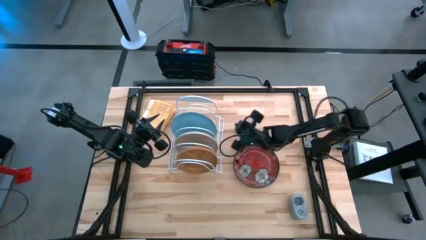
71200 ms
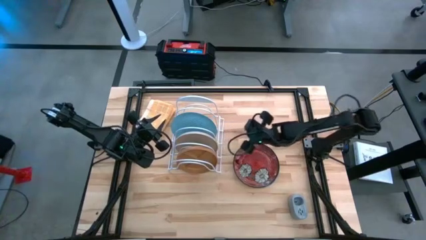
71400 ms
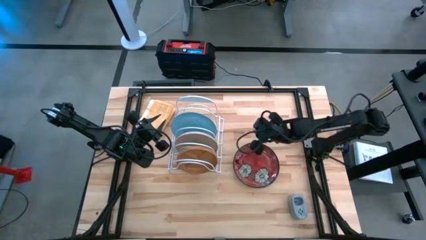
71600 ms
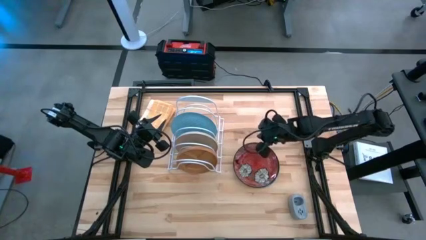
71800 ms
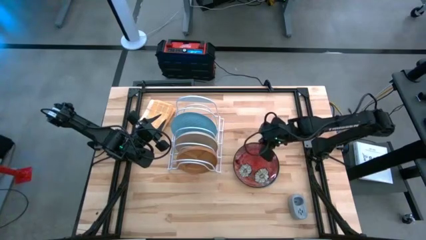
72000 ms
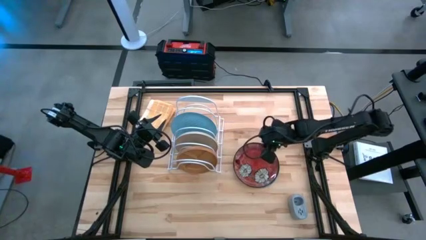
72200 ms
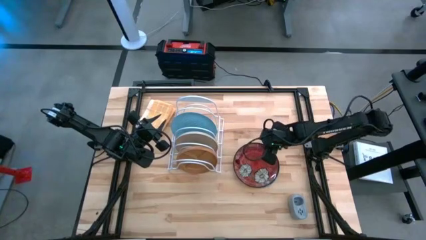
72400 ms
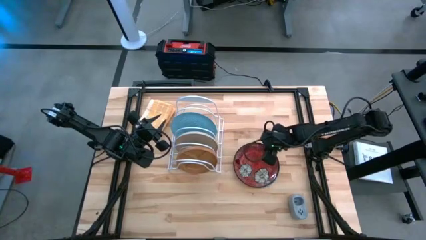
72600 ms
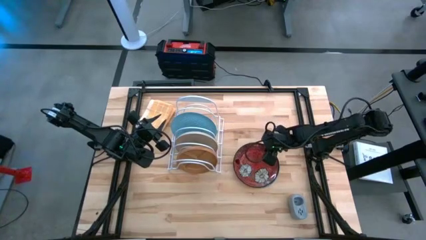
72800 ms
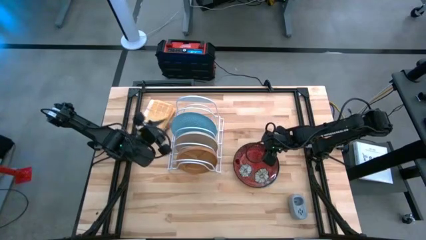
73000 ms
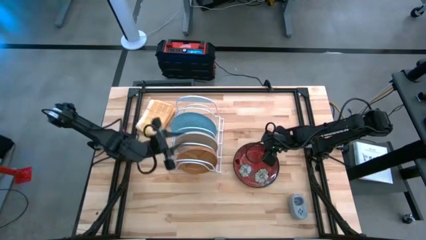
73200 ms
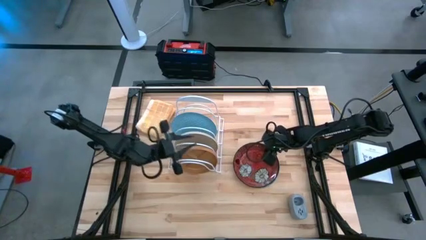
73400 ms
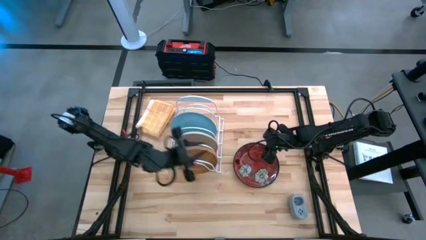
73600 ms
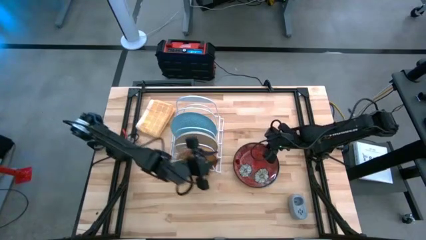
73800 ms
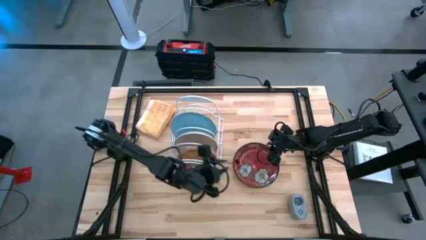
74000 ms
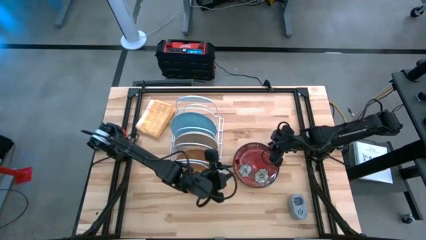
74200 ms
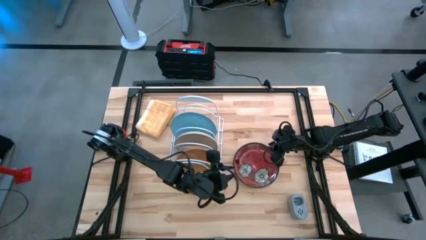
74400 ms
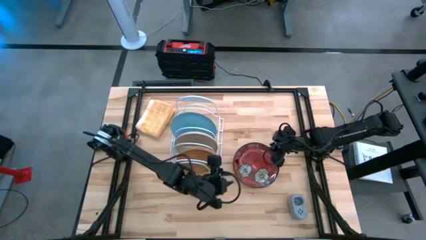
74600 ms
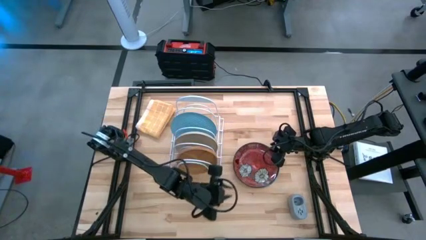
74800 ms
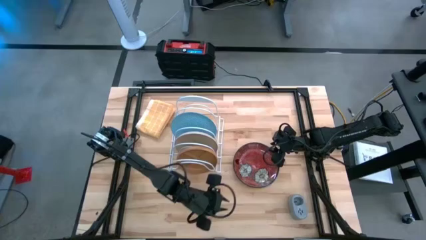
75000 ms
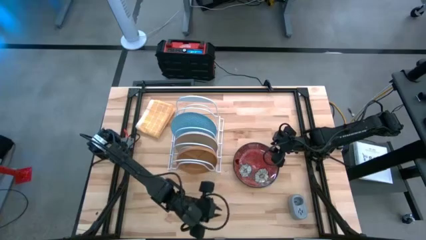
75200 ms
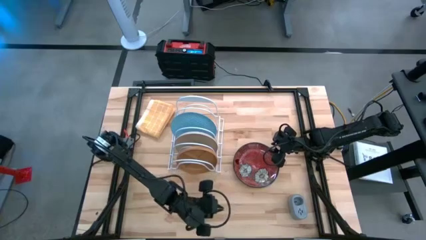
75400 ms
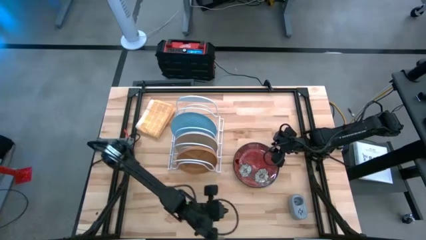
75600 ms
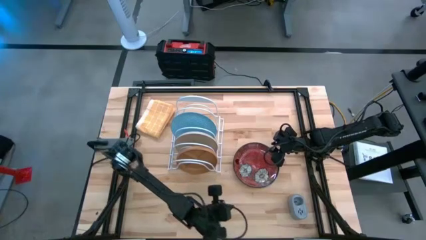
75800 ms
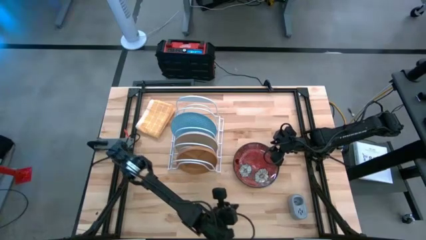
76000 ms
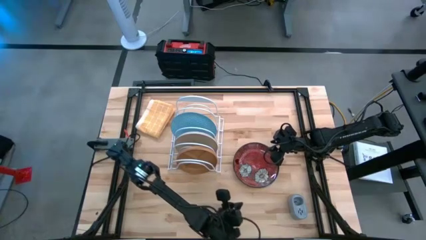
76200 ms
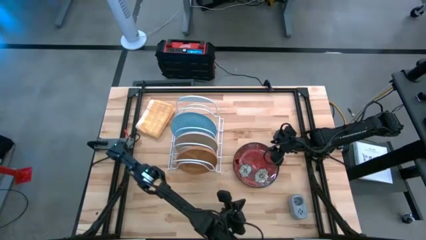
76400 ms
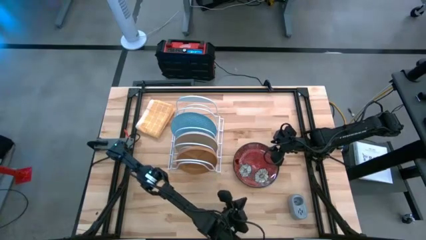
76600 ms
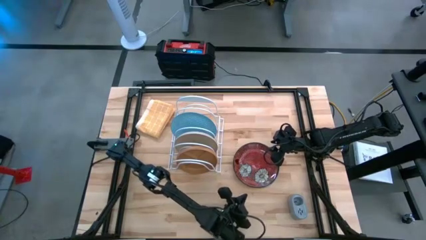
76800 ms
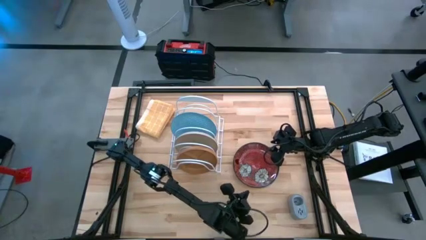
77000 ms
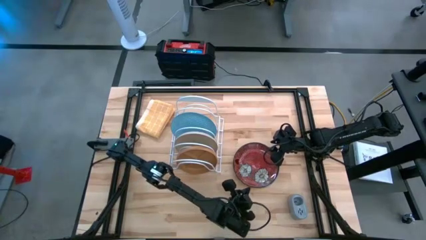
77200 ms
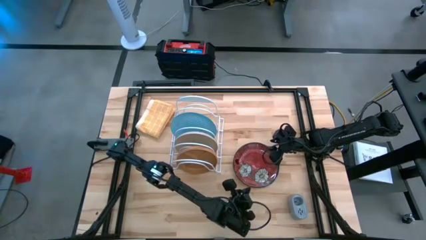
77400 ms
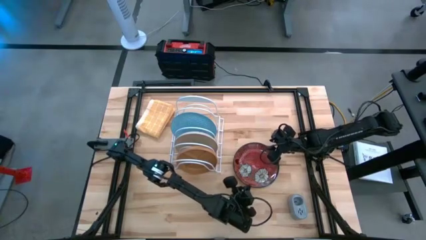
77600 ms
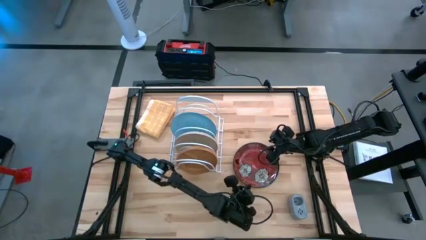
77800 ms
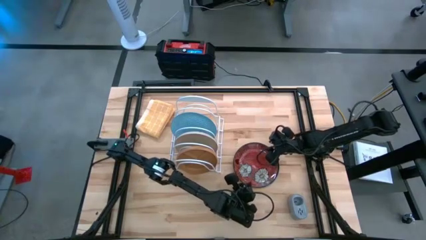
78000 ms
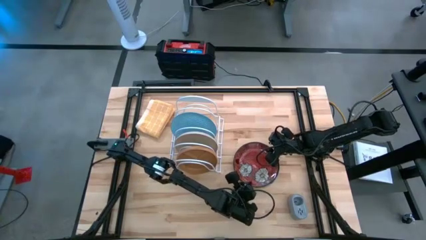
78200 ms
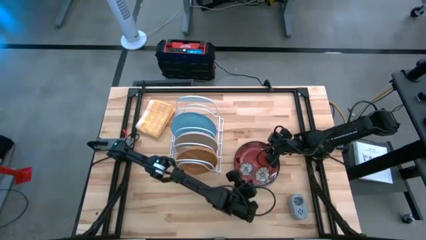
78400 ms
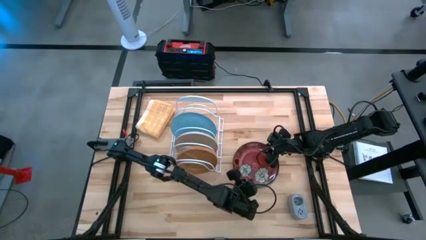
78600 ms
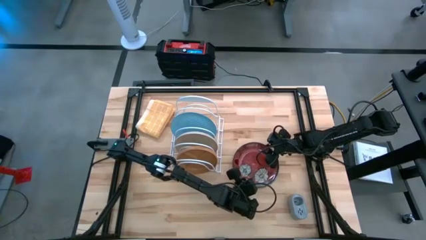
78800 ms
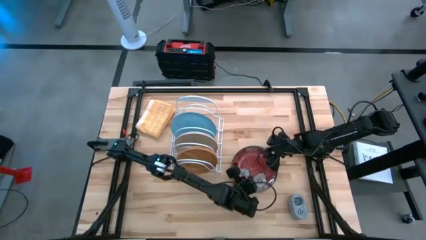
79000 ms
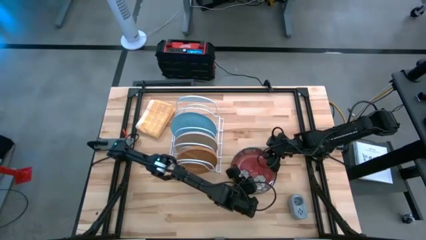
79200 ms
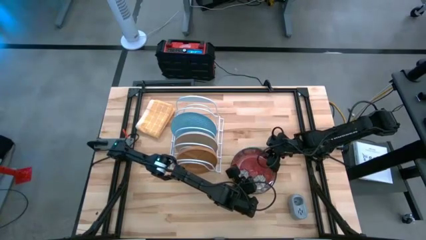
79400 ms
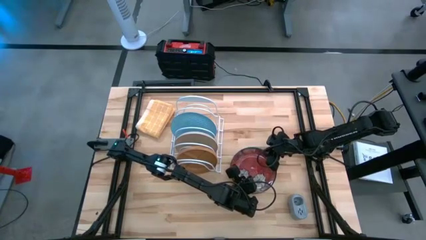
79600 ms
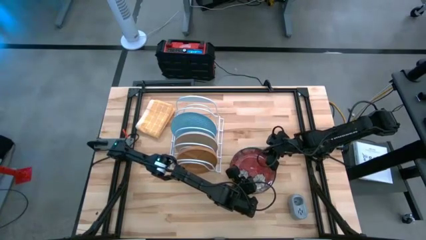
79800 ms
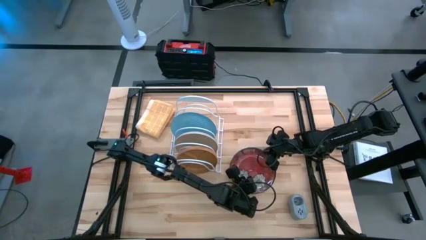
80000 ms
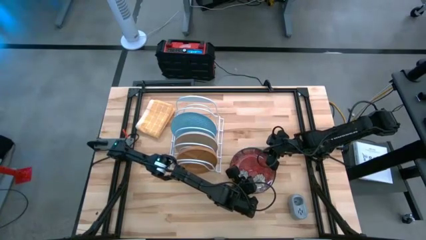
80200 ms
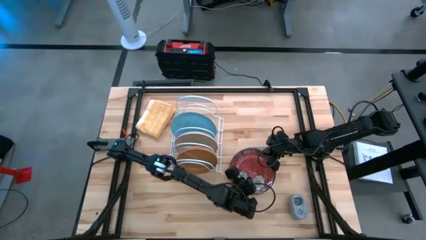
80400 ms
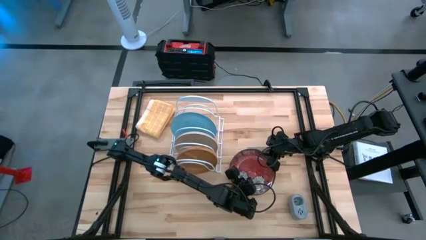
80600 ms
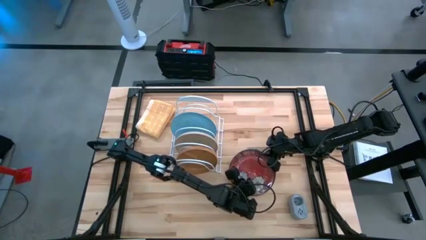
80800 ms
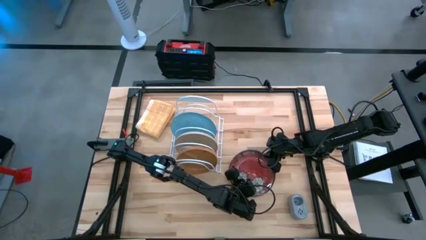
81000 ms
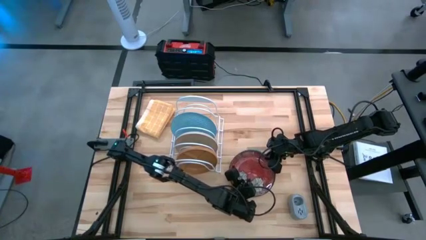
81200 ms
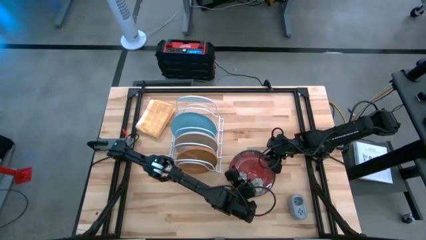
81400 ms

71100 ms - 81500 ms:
Task: Sort dishes
Put the red plate into the dishwasher rack
